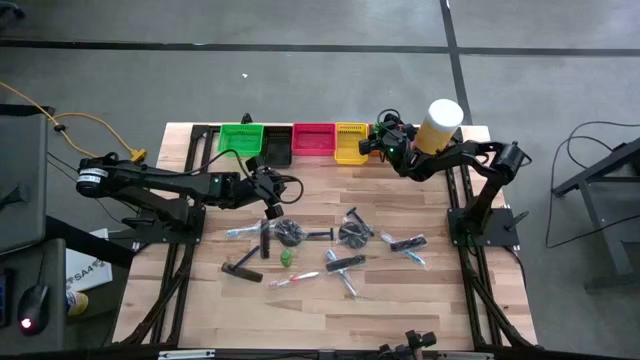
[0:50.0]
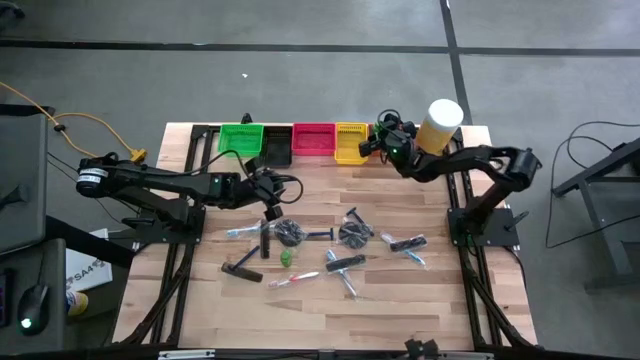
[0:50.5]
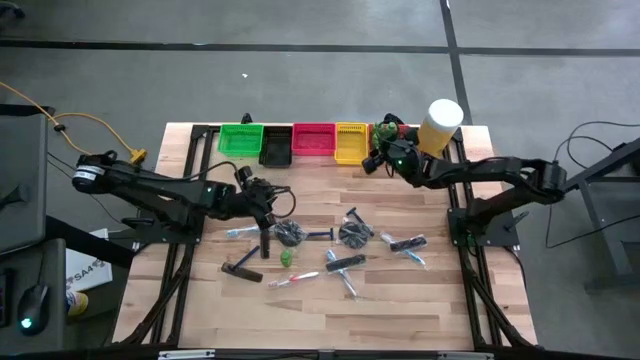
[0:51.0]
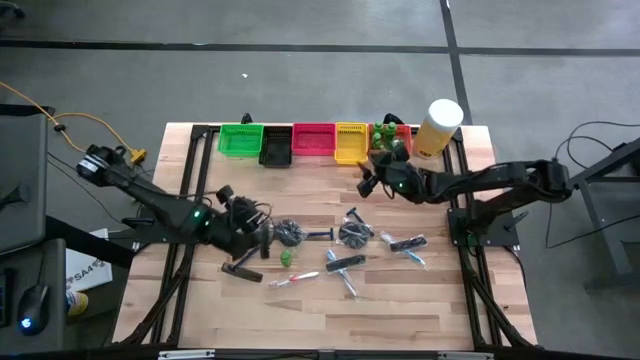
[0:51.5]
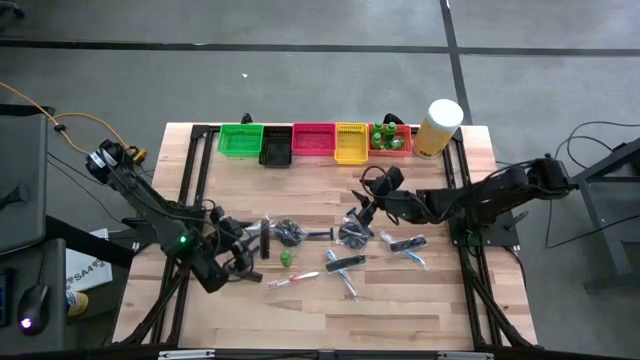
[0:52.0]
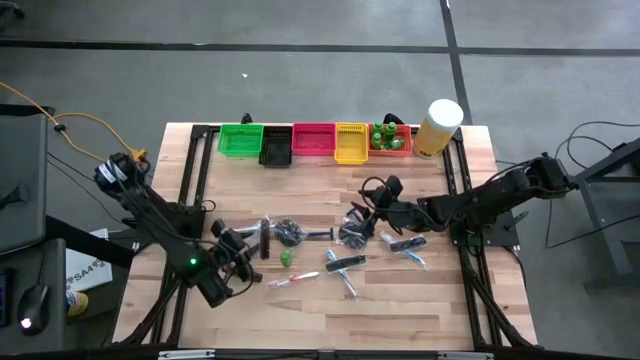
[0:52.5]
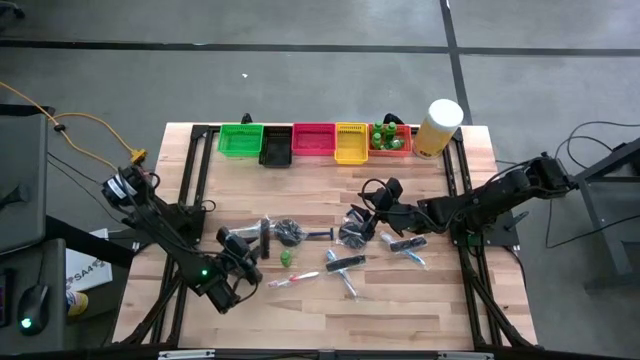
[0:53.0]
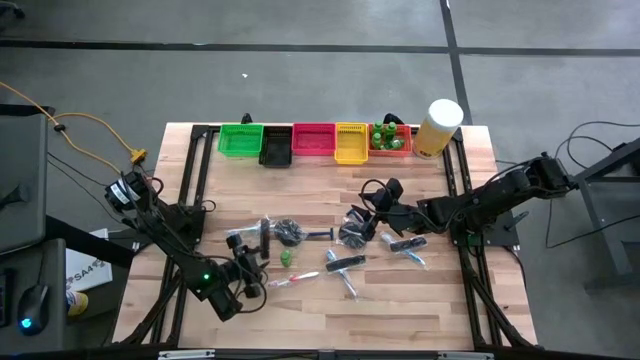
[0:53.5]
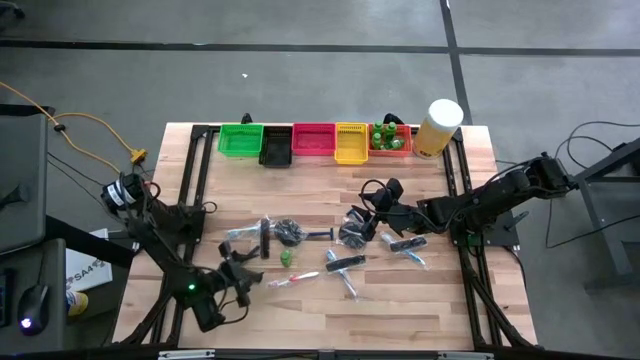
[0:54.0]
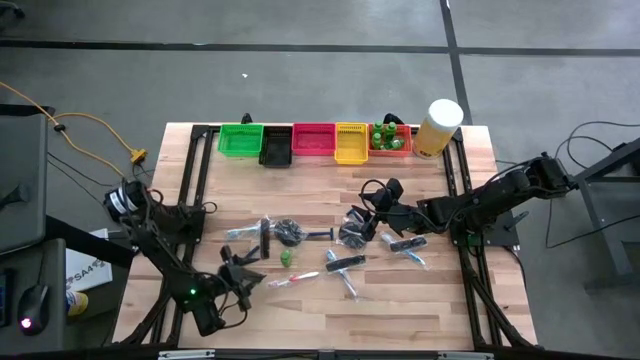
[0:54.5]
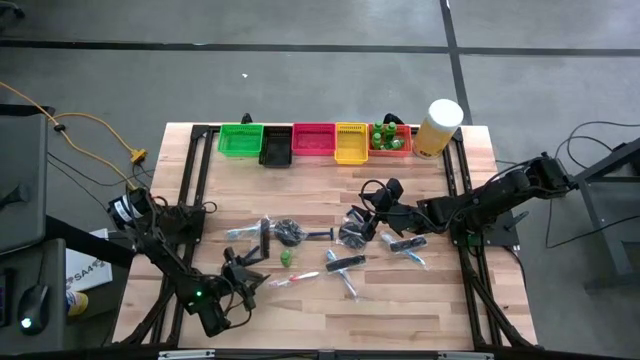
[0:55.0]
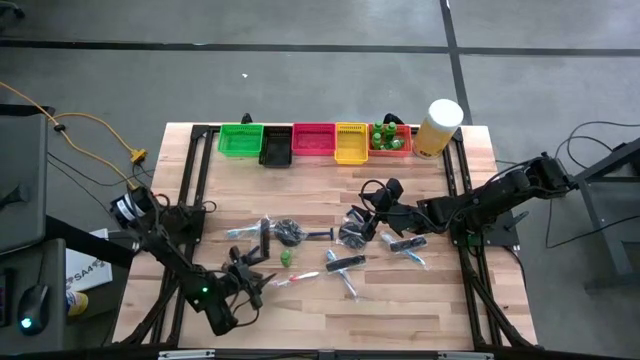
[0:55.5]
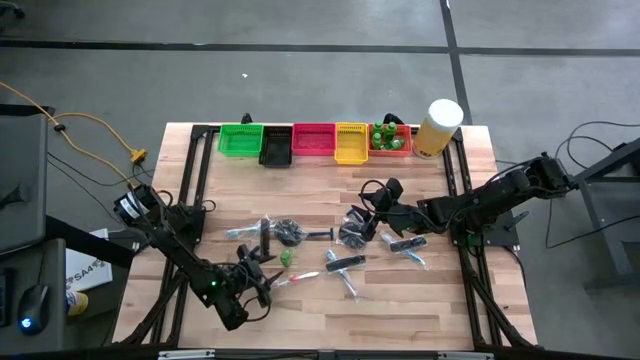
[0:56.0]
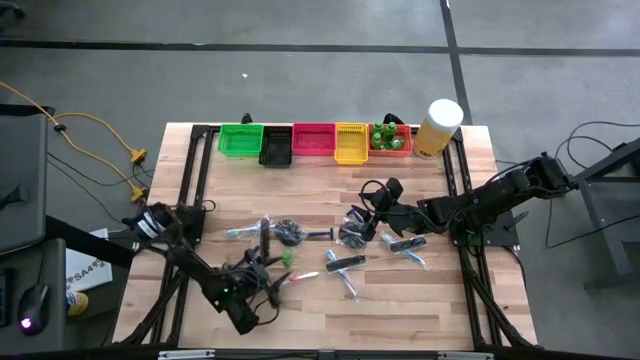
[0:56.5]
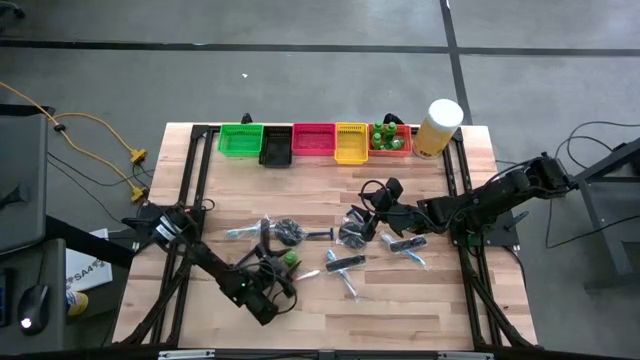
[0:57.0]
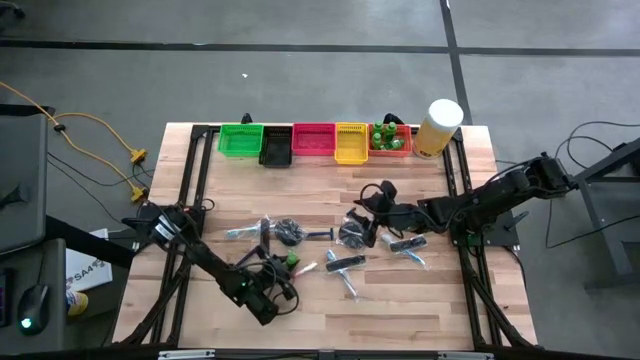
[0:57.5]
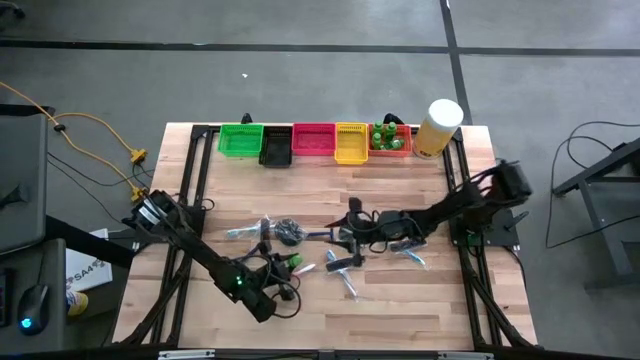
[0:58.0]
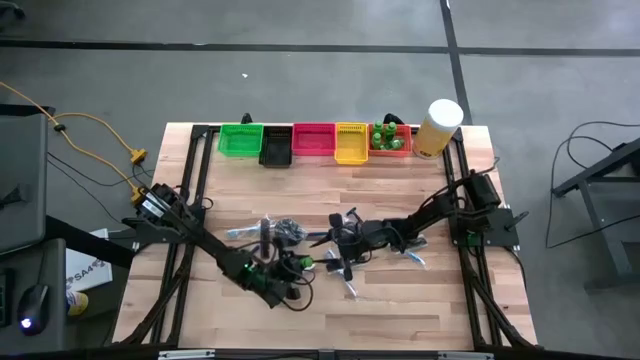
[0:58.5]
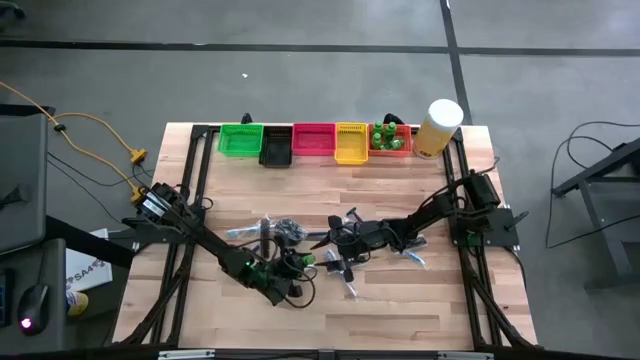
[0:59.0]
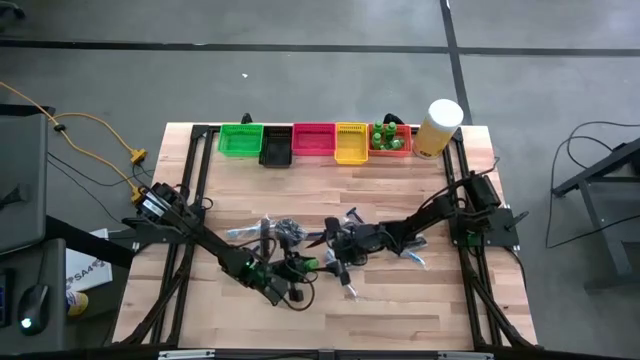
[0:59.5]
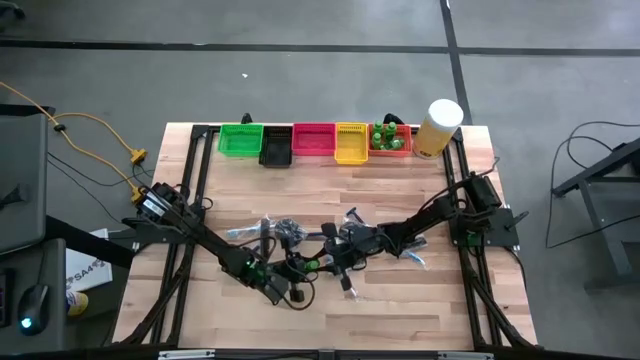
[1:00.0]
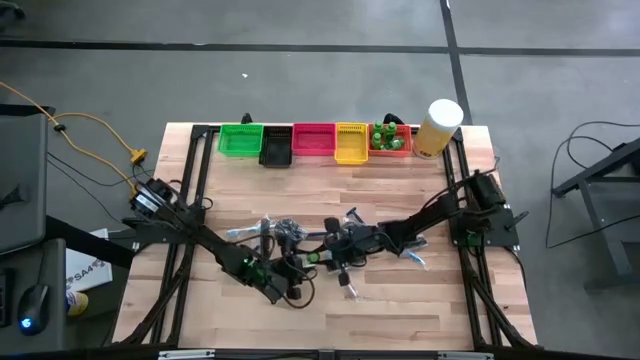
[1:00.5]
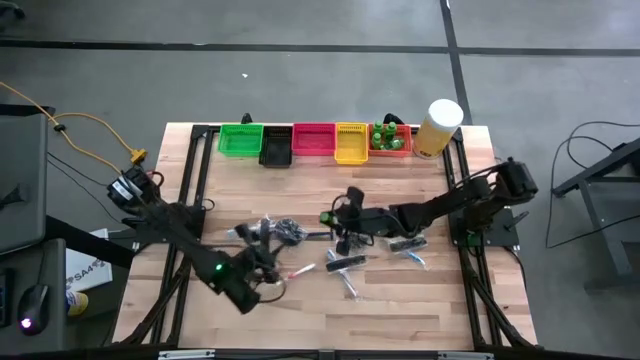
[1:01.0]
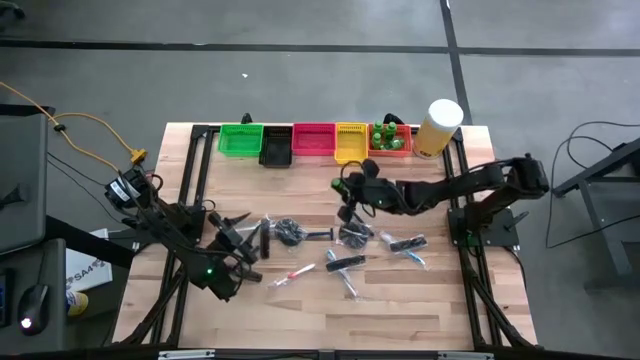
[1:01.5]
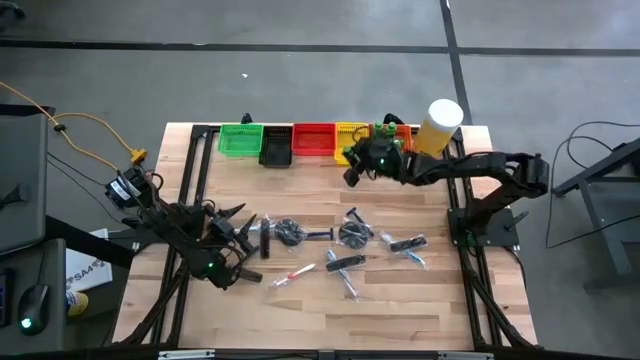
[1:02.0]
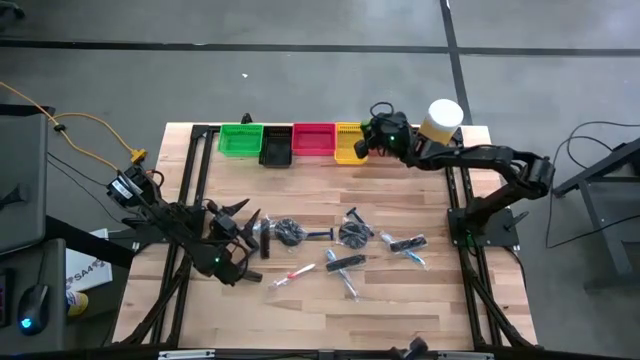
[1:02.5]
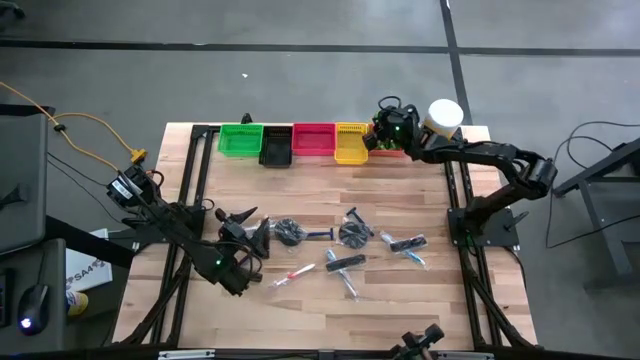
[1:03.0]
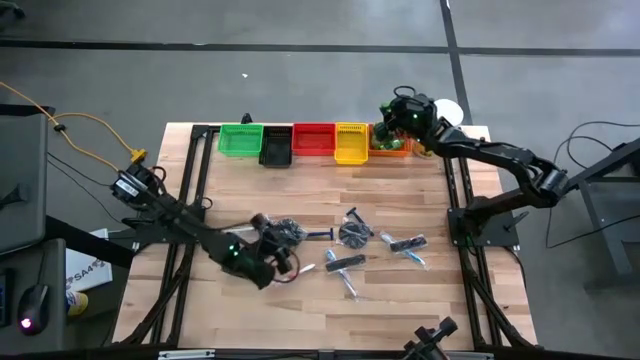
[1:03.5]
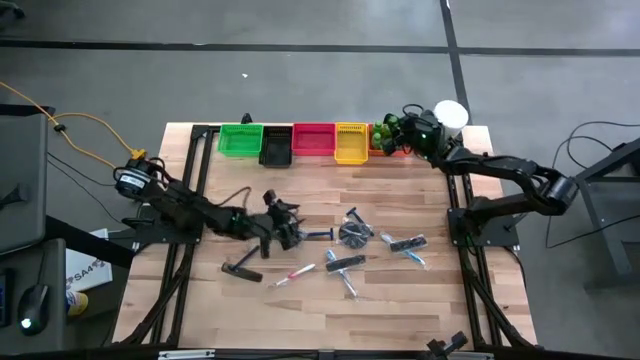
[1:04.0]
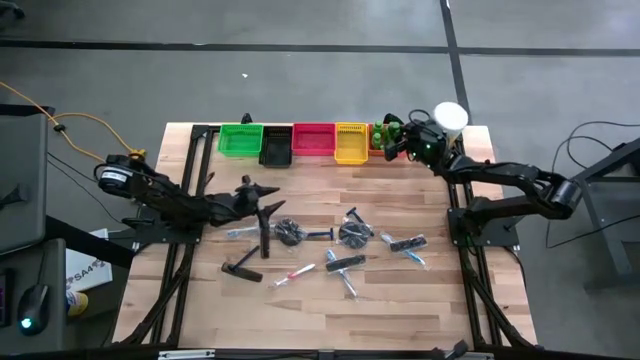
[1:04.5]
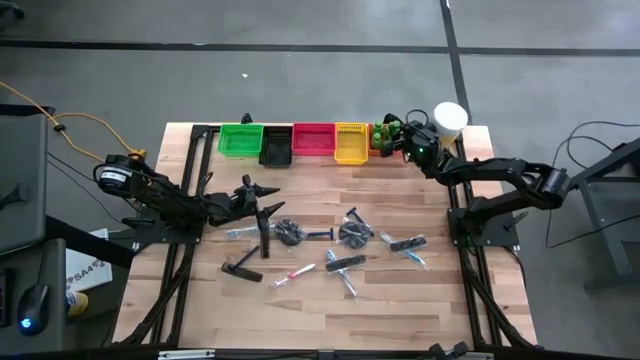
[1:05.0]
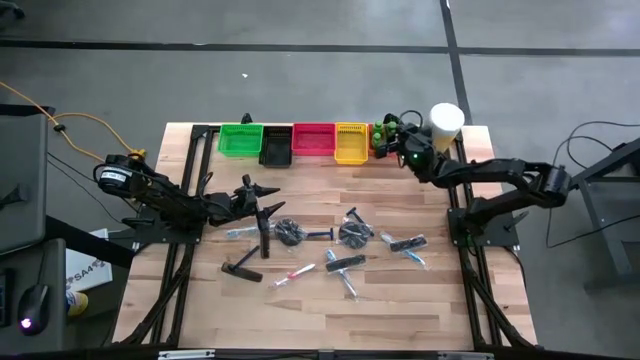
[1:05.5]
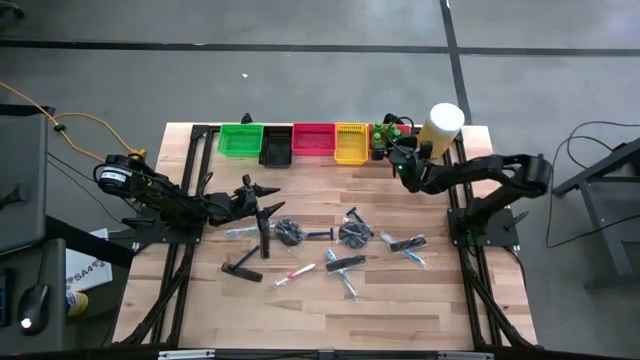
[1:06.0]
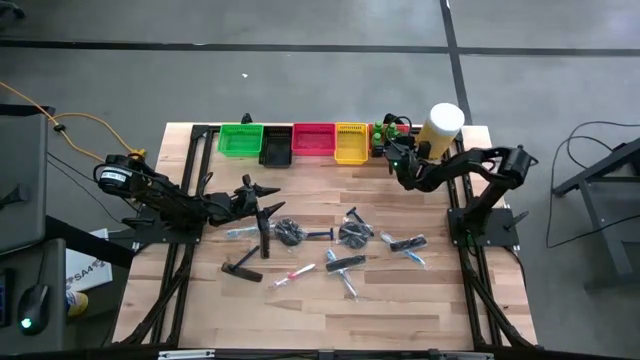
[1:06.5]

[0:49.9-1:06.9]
Task: Pick & Place Travel size toiletries
Put the green shampoo bottle into the orange basket

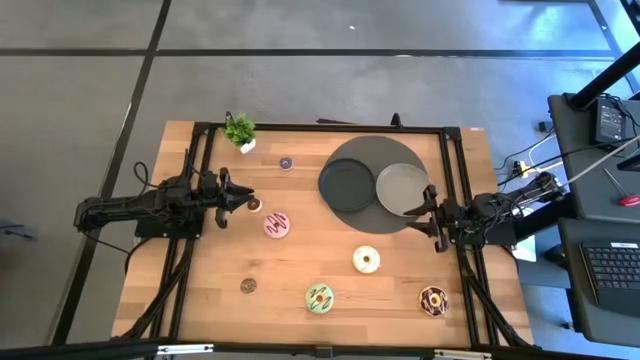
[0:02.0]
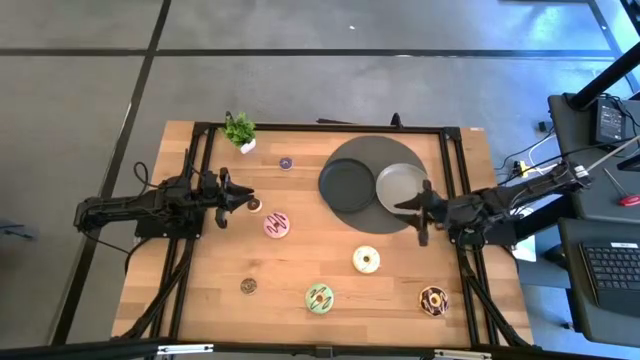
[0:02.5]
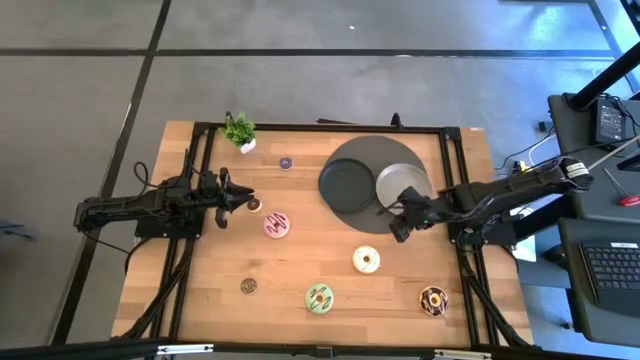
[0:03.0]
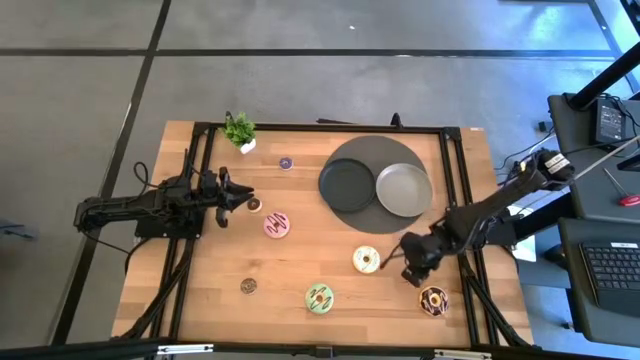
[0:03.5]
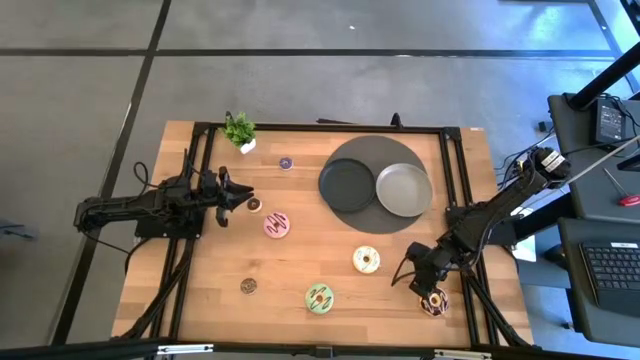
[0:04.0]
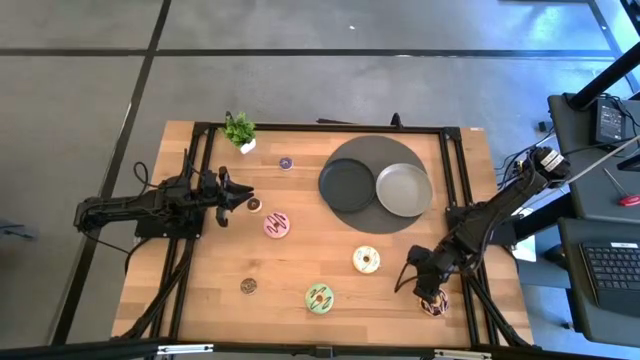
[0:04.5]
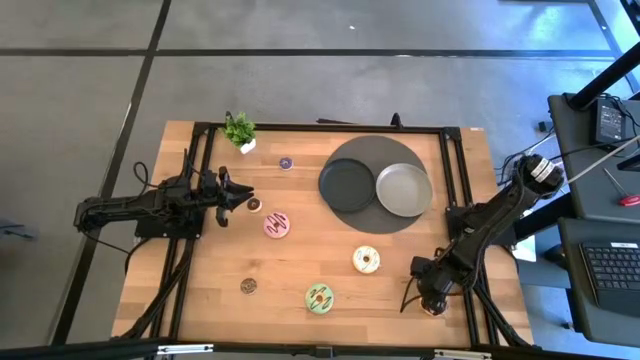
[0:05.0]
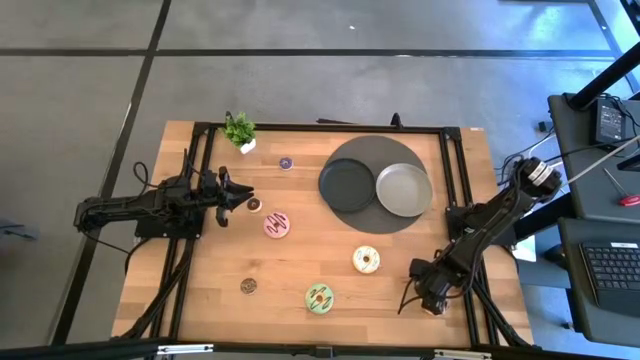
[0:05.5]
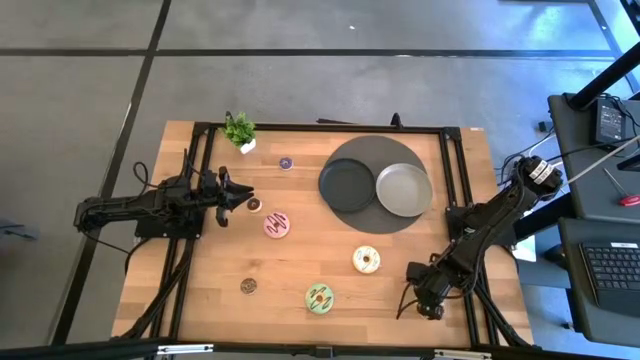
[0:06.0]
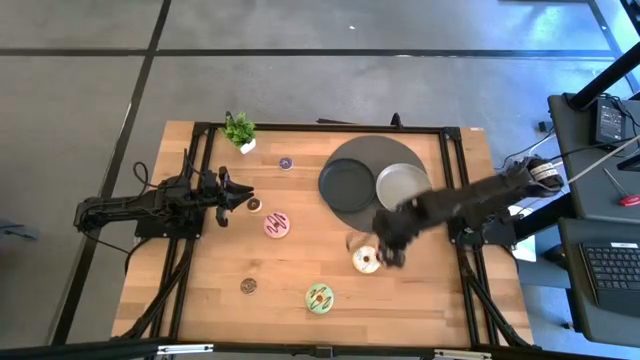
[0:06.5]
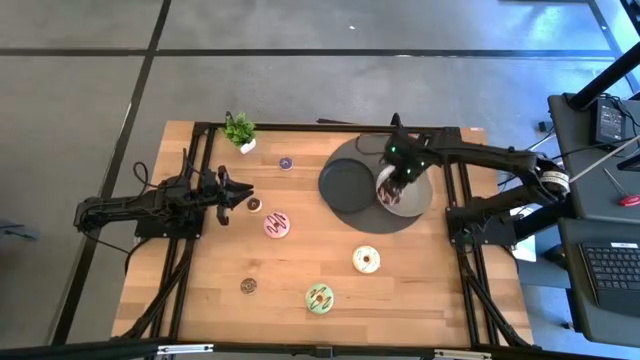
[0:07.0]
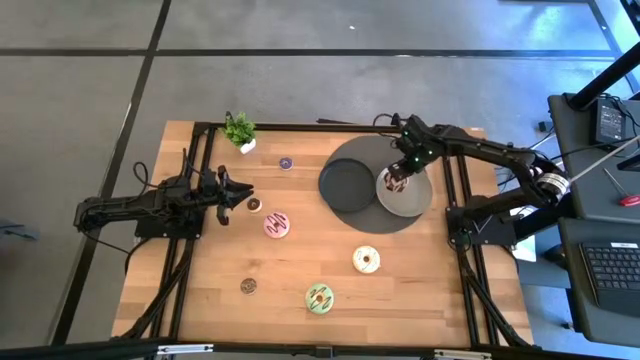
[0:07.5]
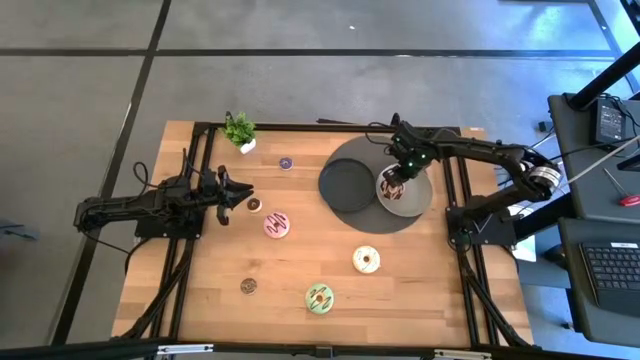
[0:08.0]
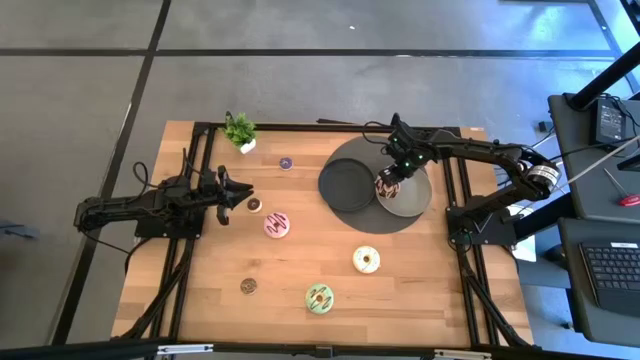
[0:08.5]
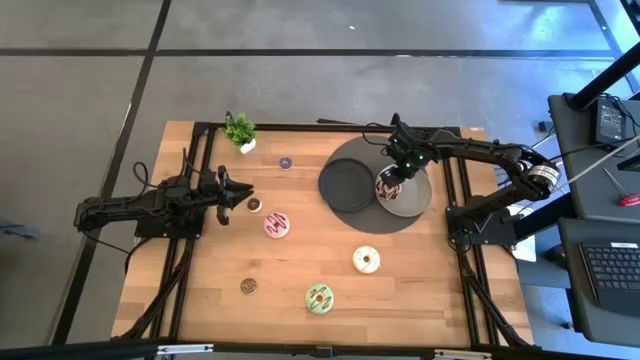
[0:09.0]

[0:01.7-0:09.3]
Task: Pick & Place donuts
Put the large black donut on the gray plate
